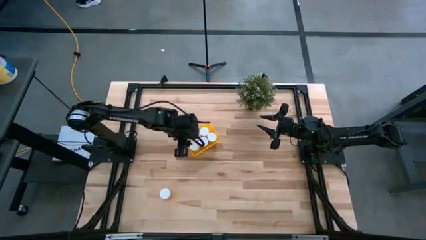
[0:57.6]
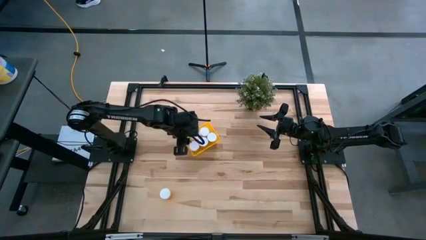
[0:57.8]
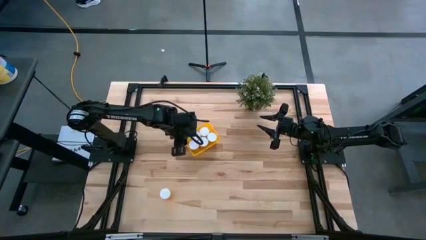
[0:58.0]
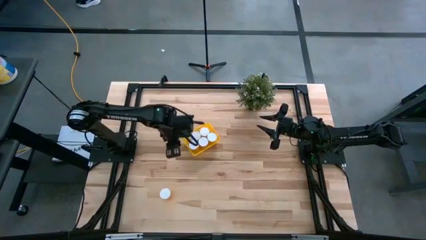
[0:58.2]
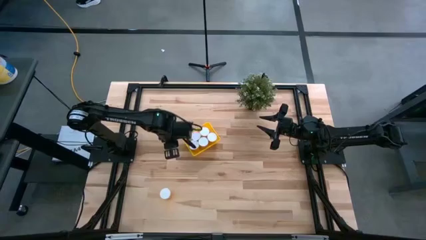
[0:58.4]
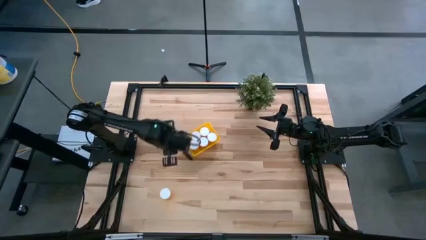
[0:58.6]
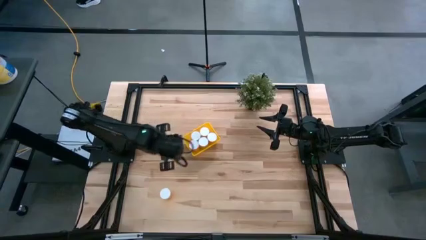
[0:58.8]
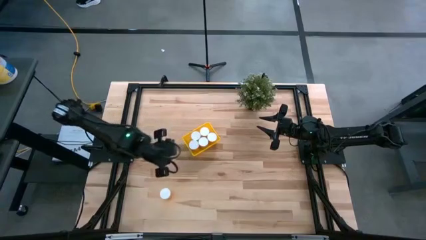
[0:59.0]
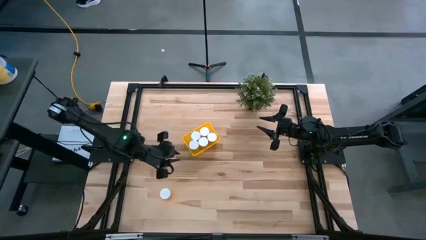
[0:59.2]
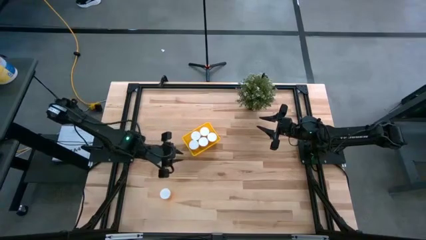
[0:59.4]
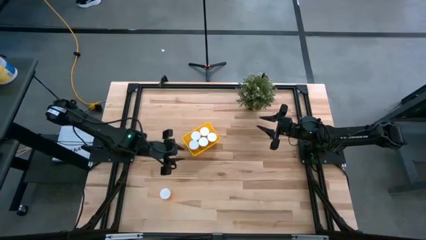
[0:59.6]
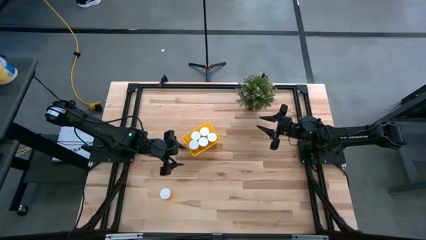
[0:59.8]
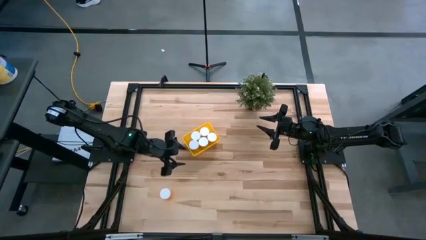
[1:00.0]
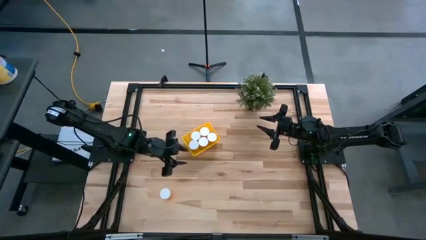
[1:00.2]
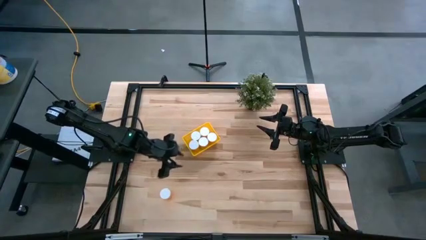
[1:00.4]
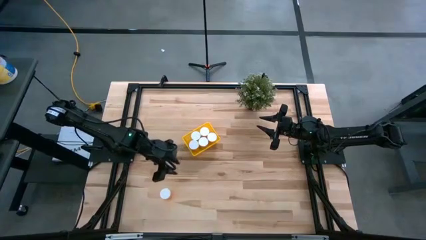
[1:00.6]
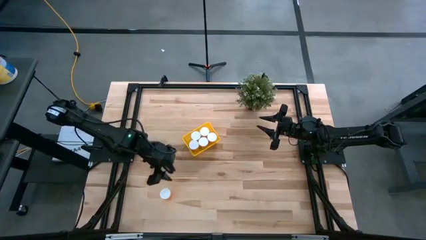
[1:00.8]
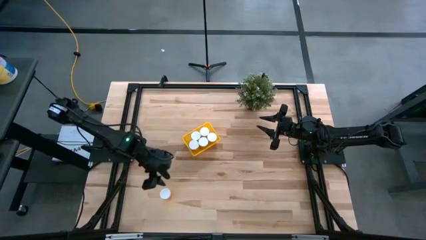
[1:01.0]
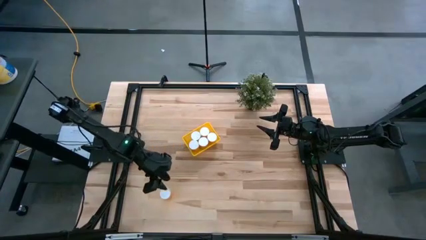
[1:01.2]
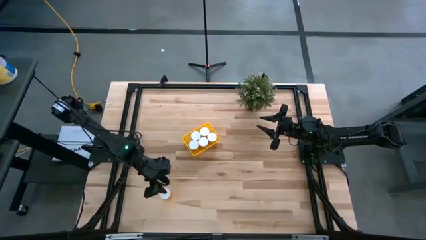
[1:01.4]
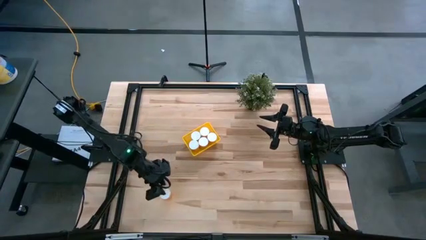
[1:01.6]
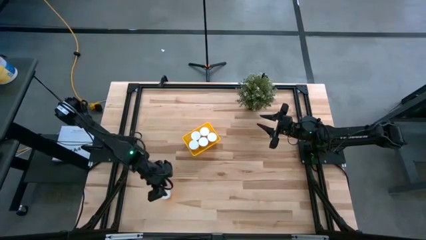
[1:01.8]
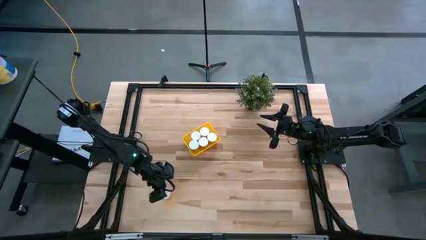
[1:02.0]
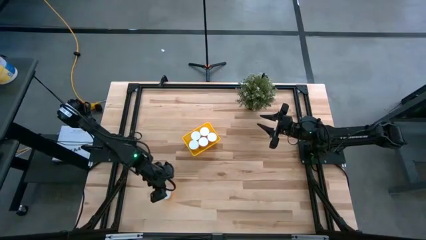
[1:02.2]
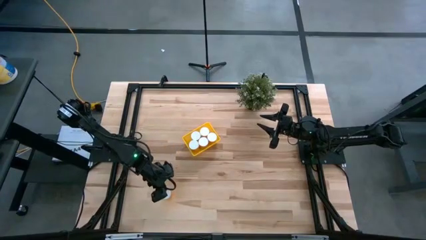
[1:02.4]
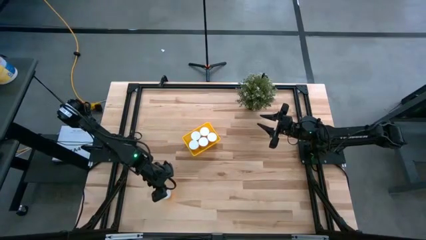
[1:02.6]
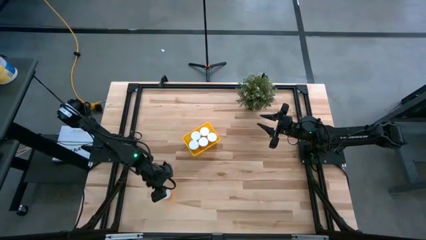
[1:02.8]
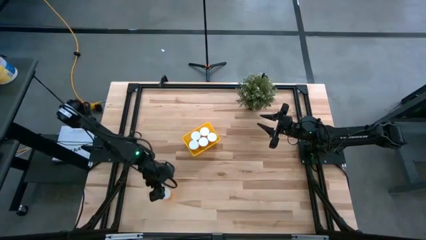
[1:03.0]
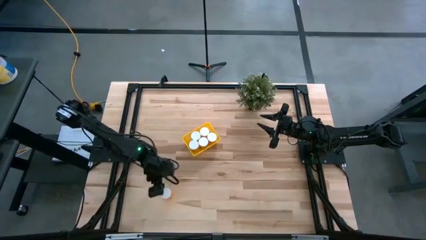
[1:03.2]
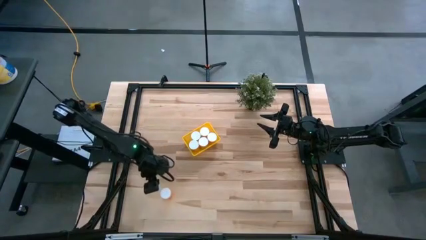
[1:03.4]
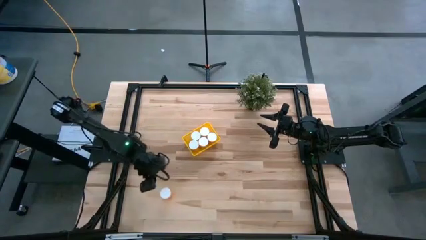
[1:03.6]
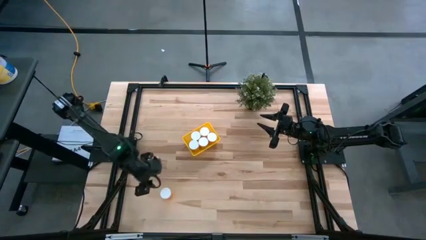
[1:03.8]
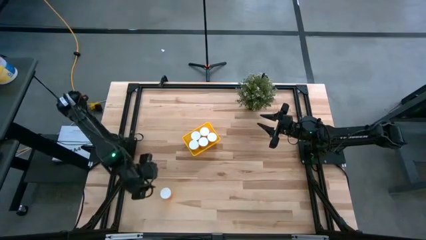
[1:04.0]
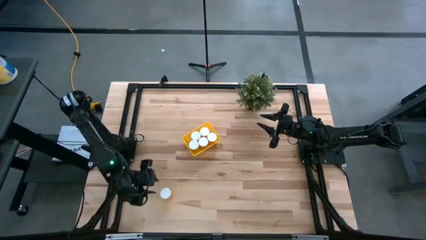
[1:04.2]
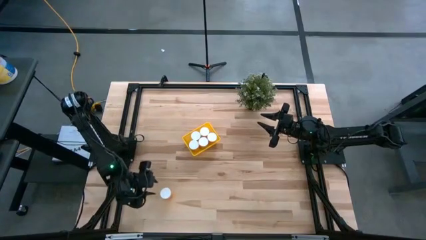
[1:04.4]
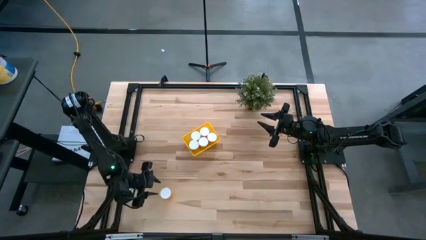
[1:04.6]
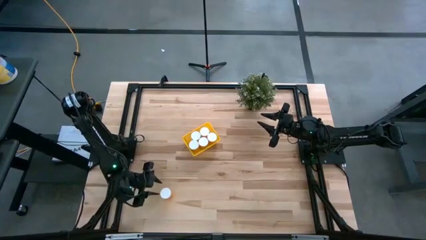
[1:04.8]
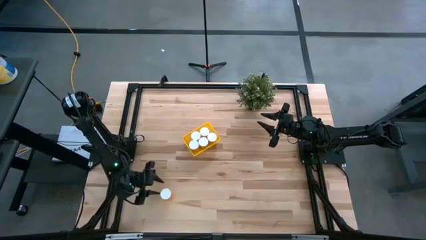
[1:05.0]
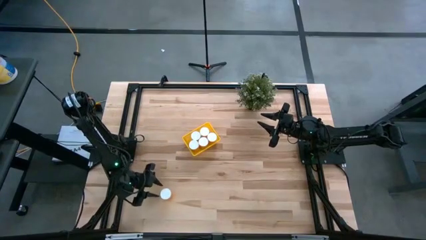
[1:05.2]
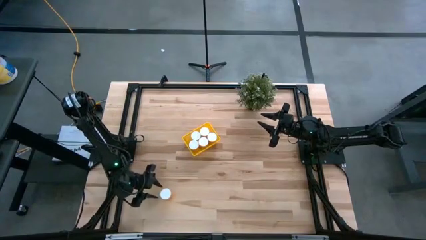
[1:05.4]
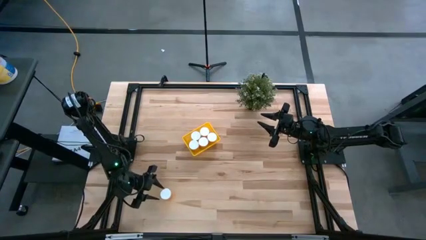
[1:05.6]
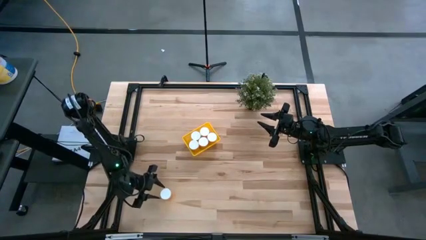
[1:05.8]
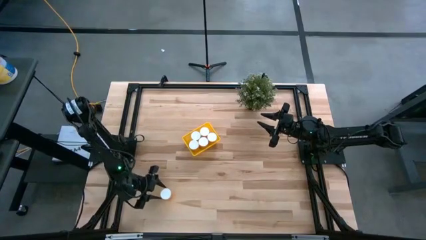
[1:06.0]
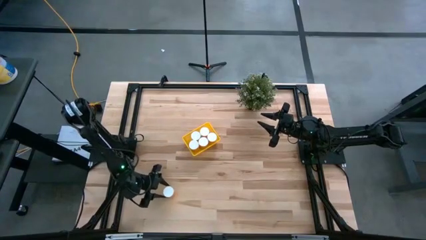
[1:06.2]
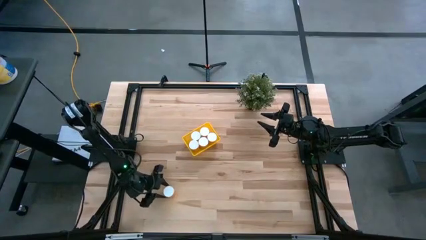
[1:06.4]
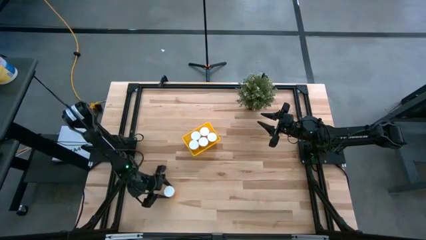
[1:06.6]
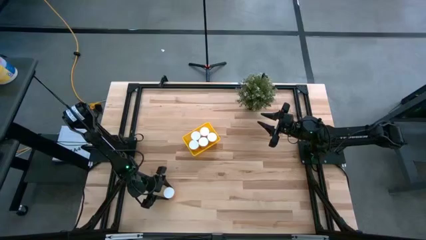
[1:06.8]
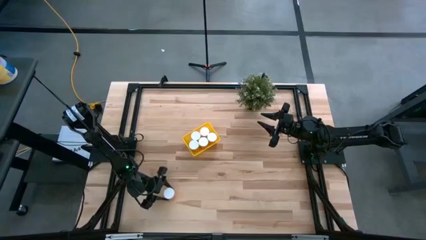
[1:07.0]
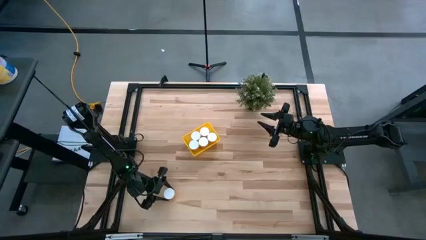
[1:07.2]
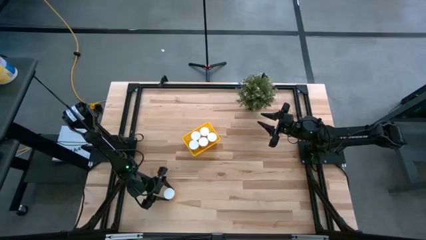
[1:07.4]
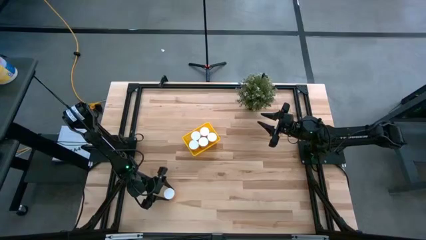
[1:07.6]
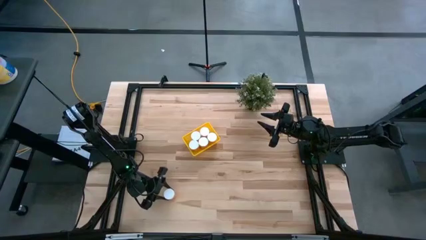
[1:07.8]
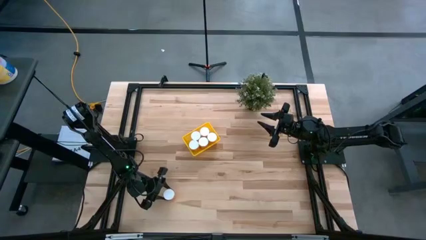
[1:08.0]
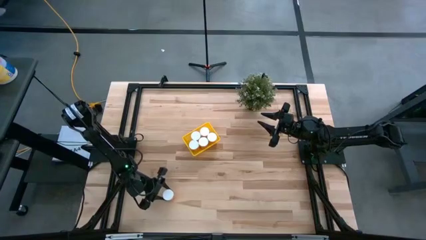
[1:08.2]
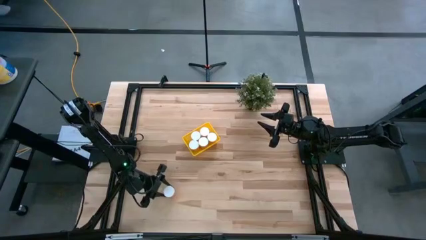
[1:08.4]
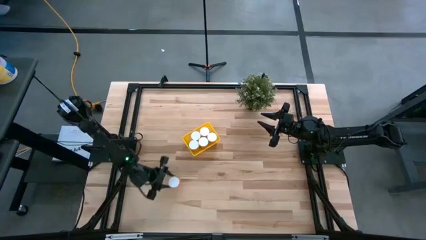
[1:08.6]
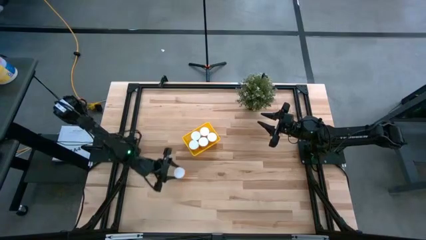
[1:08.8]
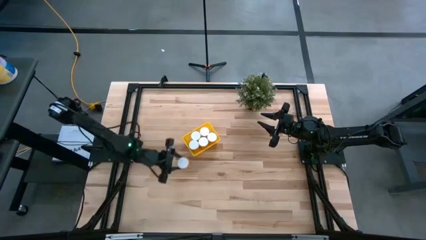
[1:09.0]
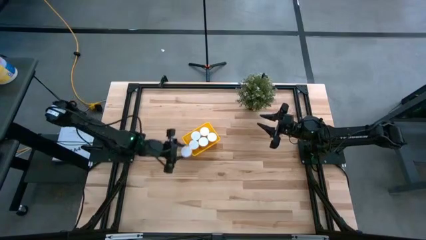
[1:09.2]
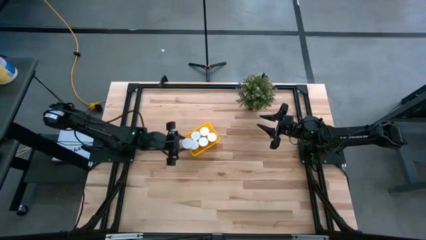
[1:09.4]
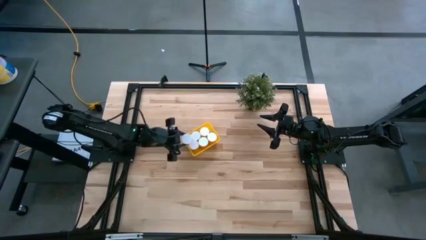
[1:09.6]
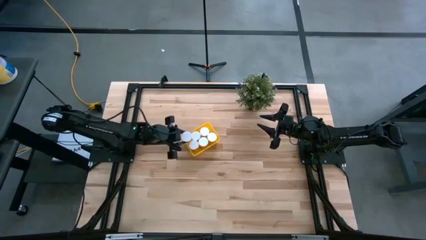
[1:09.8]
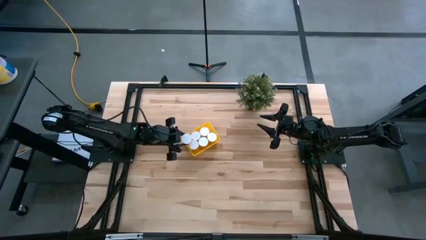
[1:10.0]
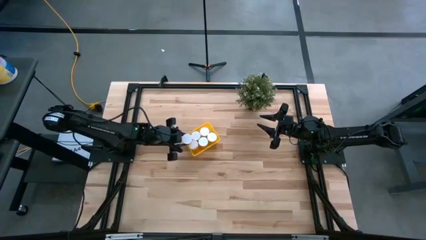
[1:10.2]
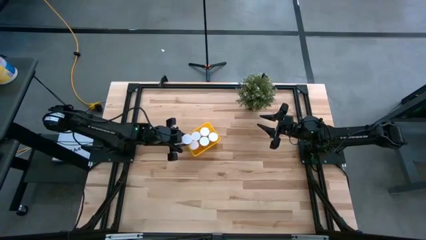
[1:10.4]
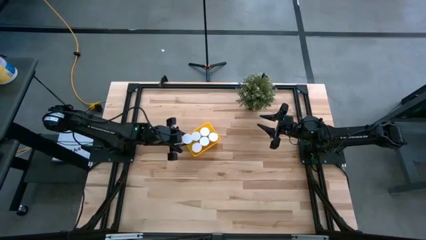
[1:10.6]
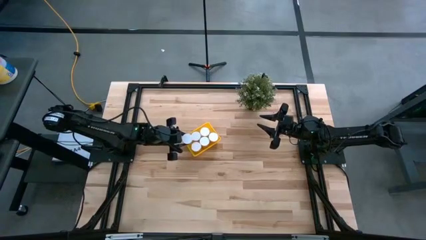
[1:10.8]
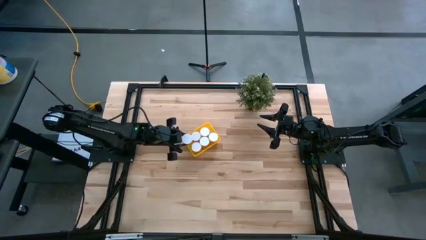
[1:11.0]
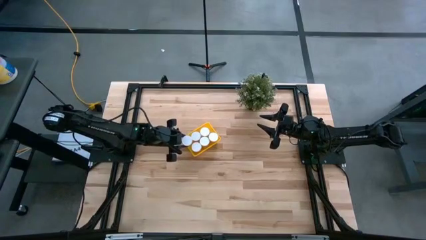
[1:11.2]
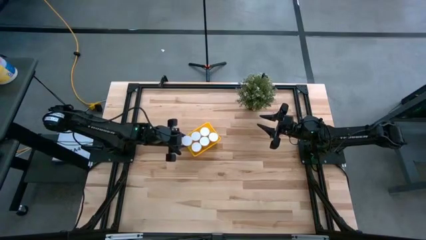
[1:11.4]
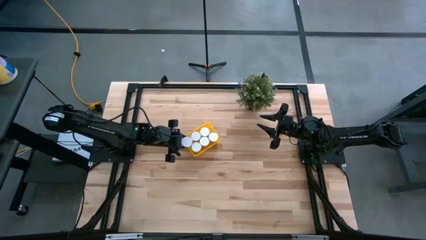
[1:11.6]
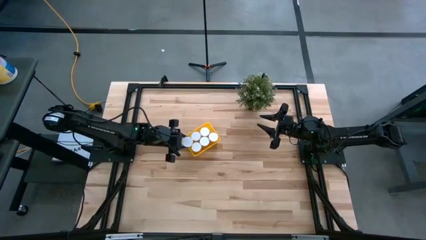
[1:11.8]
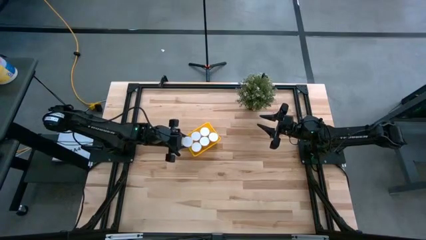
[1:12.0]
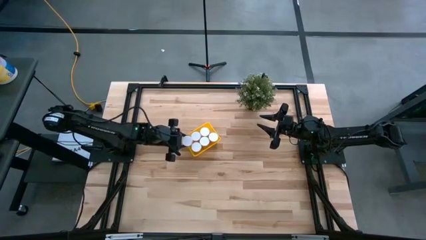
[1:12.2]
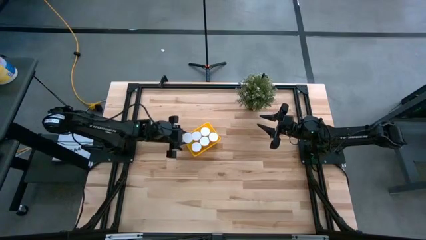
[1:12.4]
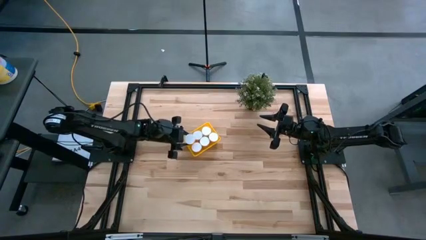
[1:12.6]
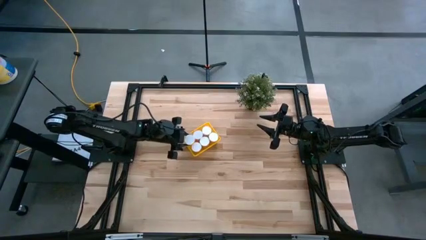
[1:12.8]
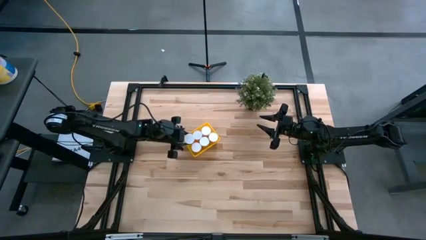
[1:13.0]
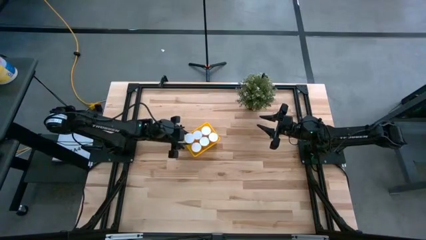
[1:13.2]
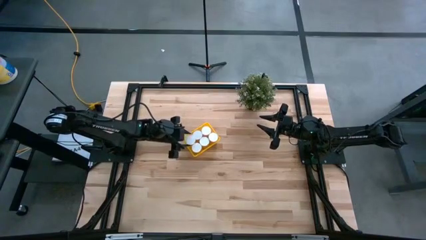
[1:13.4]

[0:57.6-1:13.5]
Task: Pick and place pill bottles into a basket
Put the orange pill bottle into the yellow bin
